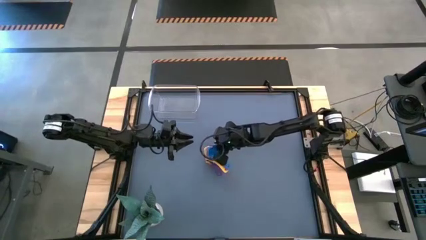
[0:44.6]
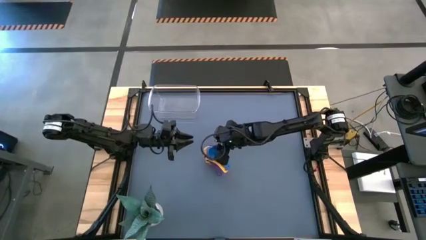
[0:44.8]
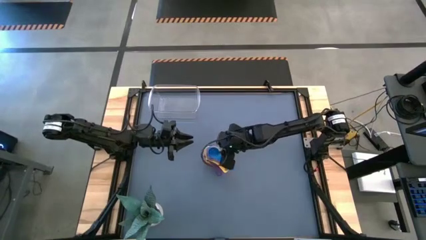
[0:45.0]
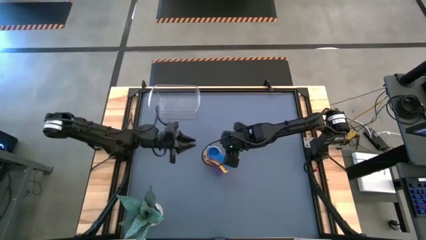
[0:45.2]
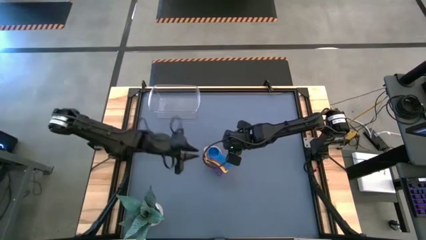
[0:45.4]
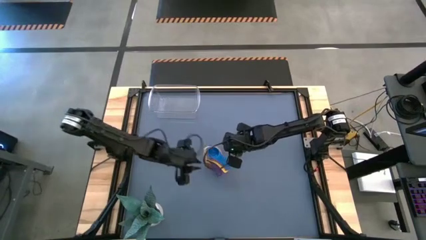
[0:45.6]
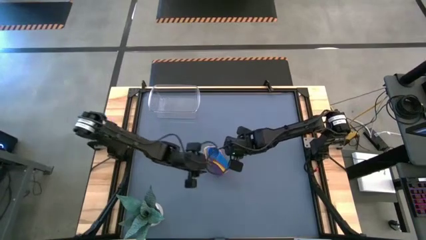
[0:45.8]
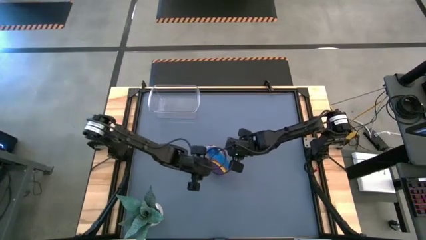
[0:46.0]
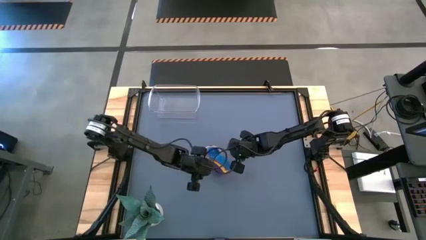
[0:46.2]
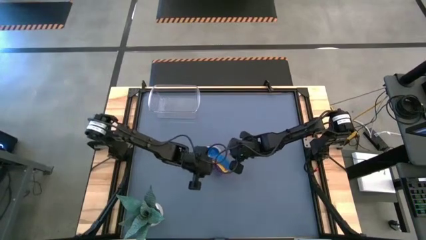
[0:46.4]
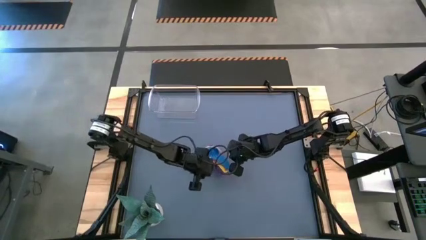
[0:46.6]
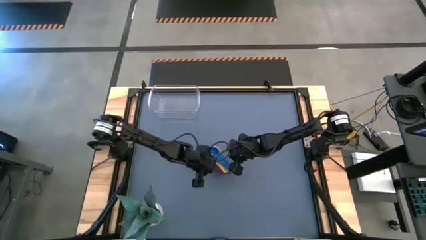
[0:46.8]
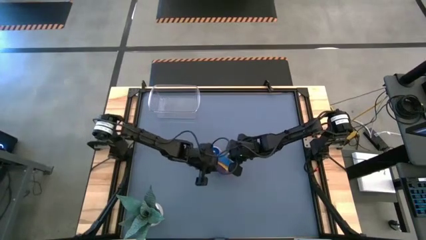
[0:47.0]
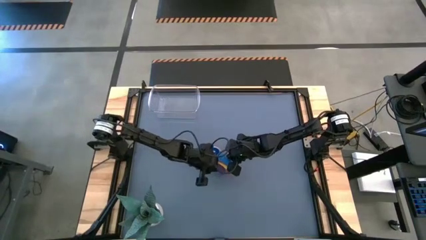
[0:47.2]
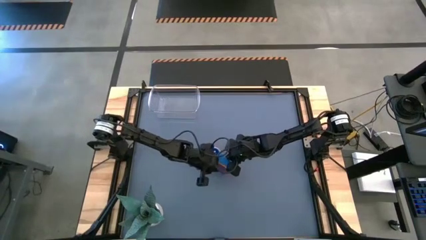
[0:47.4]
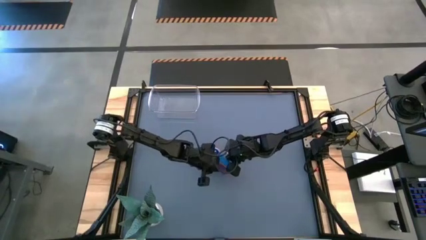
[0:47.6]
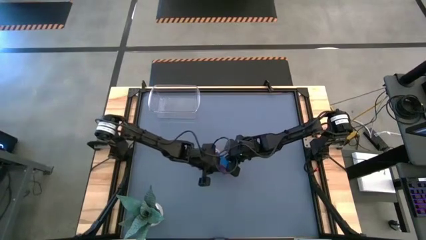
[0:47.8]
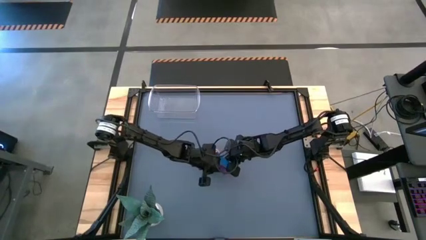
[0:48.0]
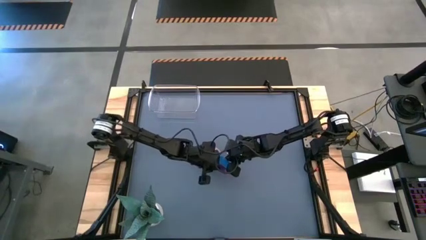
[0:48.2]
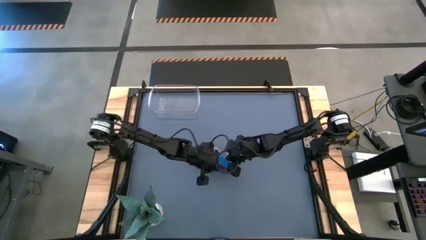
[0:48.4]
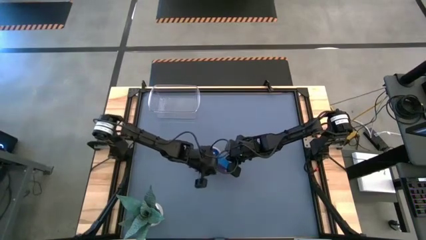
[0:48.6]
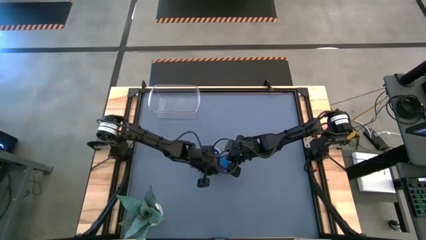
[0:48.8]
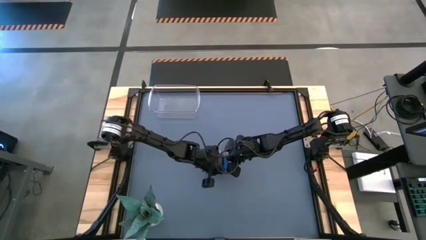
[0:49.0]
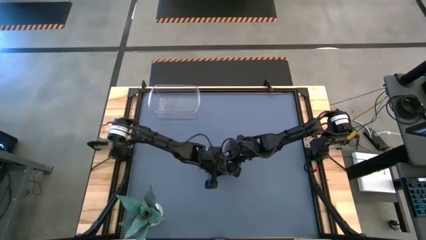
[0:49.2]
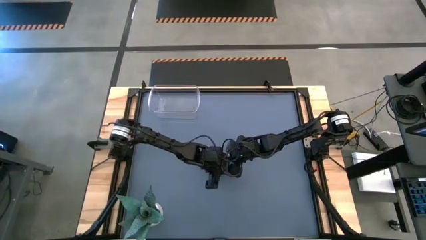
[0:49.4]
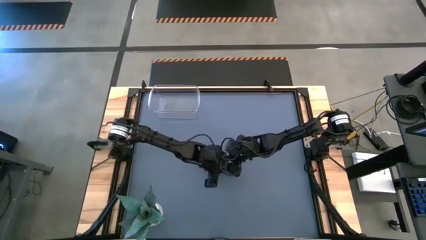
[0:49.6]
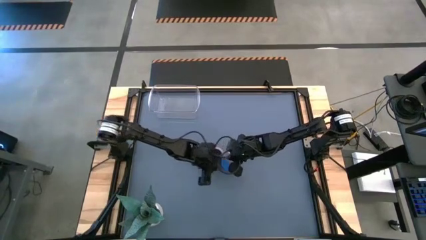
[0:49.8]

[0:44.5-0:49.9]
Task: Nest measuring cups in basket
Adjust the measuring cups

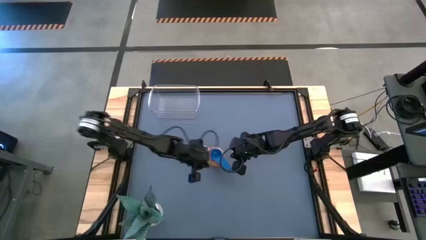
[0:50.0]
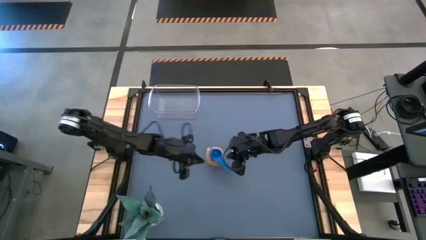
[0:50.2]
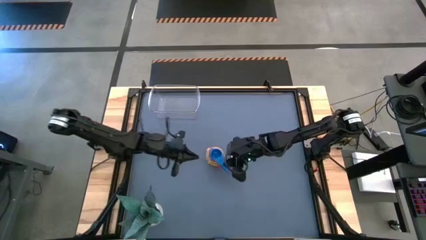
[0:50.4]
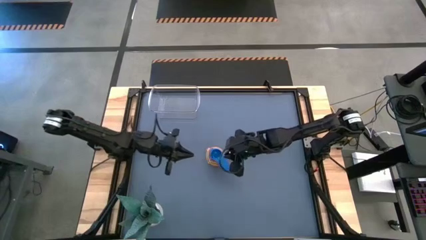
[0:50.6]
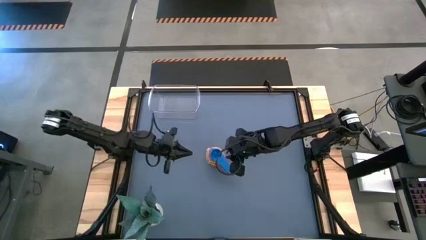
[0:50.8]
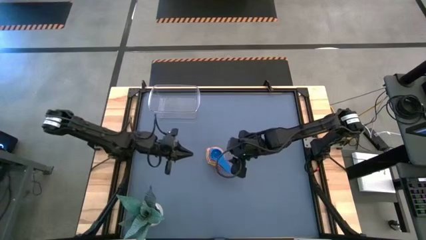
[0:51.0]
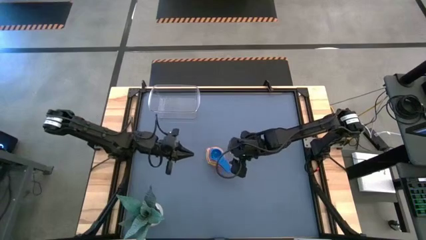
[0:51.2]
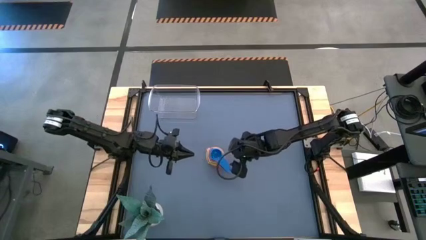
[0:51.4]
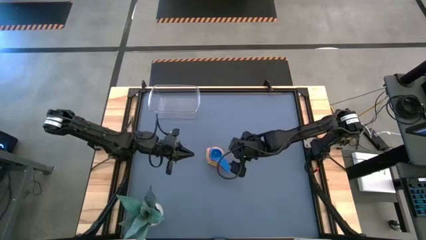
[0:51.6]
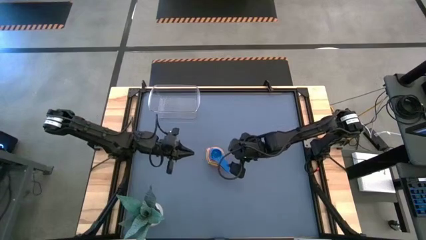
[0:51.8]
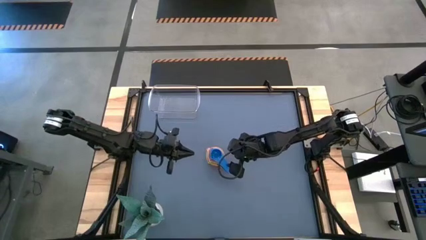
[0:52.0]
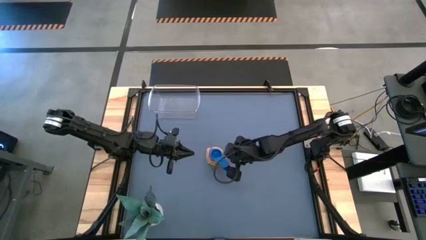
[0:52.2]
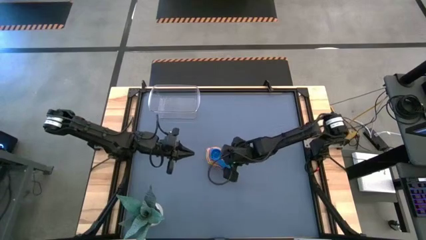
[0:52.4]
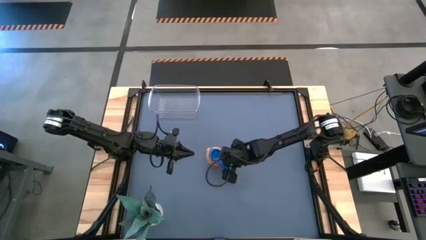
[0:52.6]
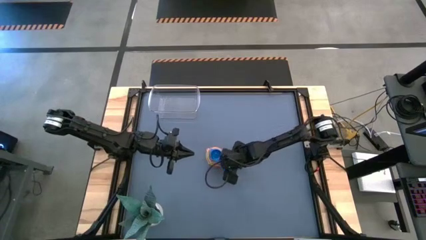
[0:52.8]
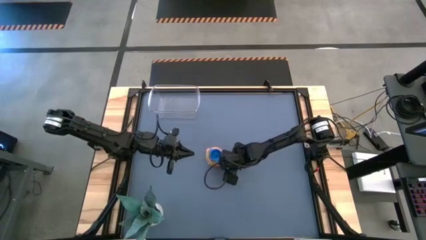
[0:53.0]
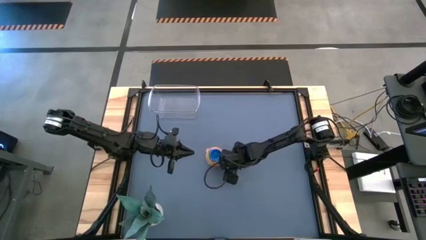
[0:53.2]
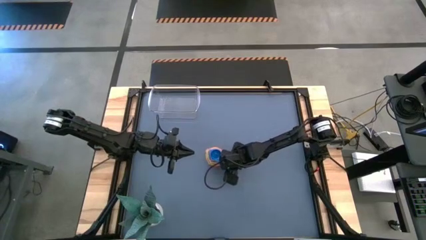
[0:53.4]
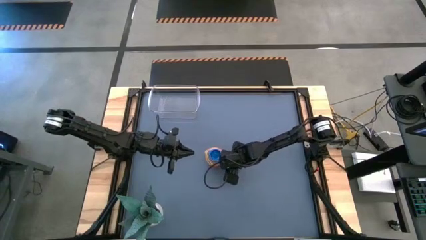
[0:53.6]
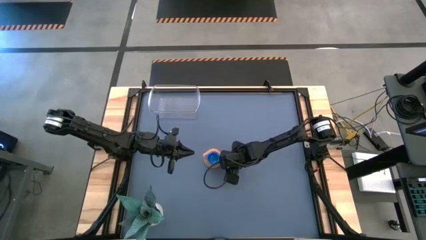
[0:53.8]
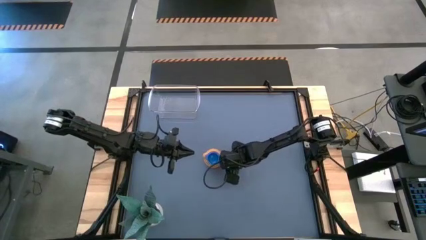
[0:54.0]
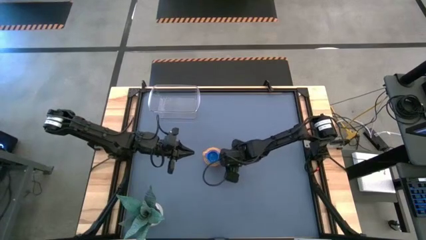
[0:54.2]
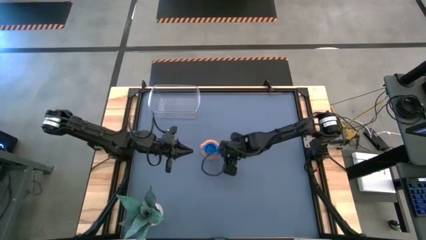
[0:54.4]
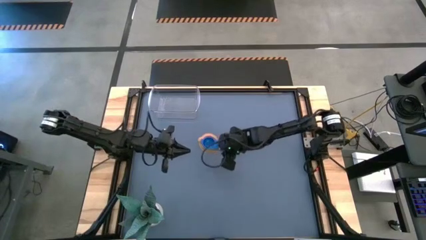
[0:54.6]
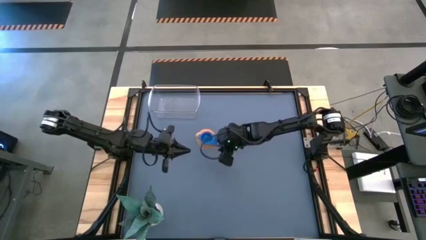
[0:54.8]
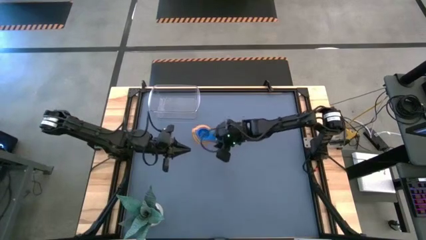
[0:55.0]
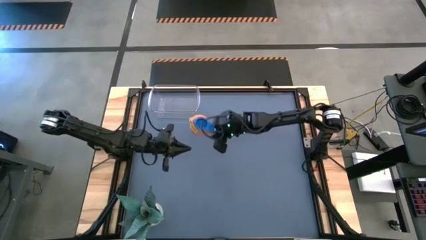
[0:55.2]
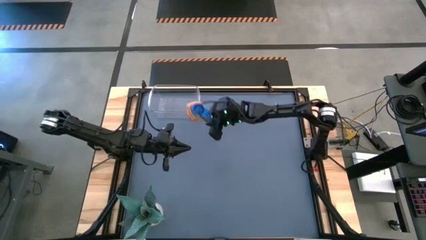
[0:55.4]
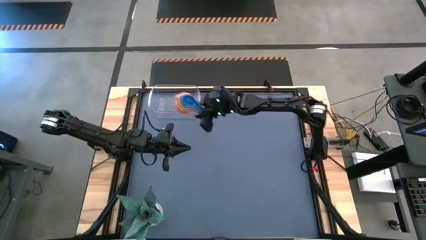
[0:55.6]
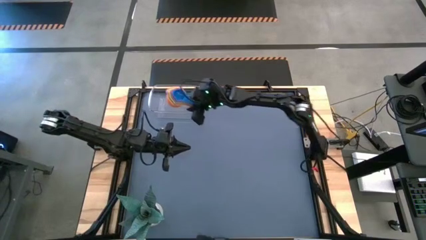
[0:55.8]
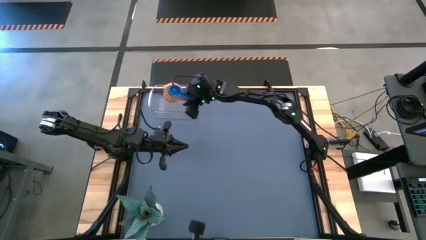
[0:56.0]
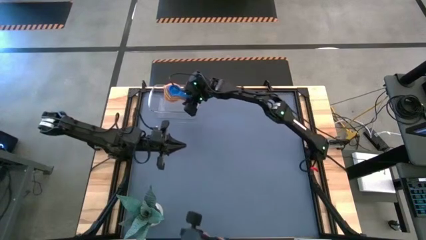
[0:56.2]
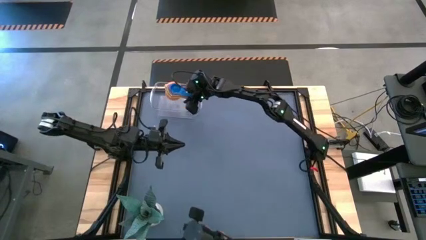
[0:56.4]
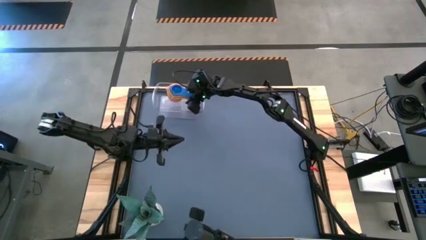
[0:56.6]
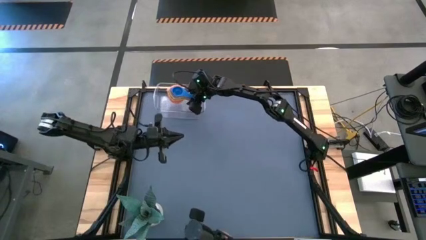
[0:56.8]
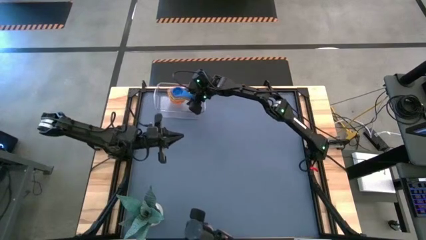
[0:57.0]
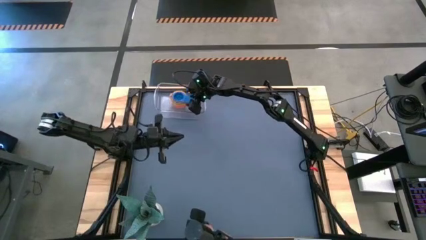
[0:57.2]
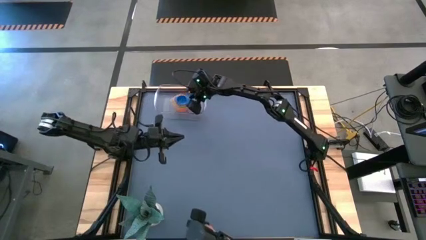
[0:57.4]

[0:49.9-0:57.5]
Put the nested measuring cups into the transparent bin

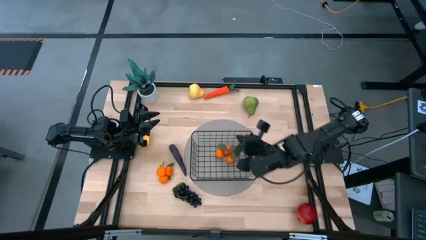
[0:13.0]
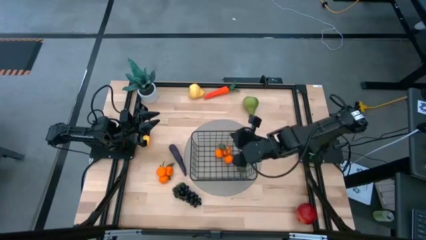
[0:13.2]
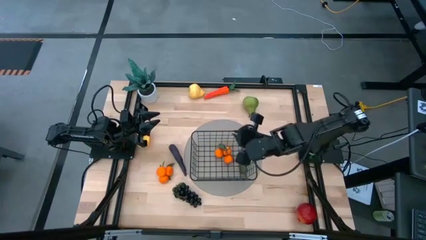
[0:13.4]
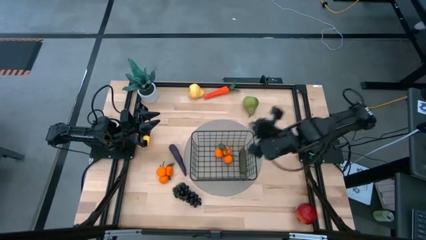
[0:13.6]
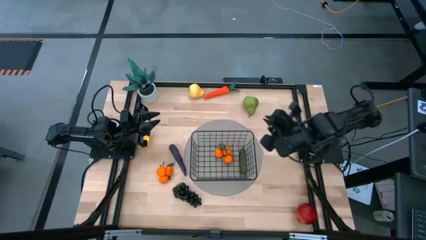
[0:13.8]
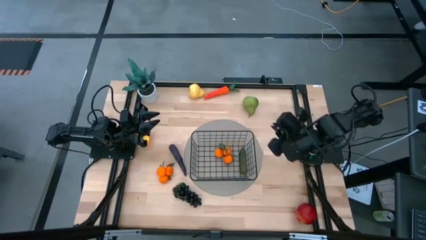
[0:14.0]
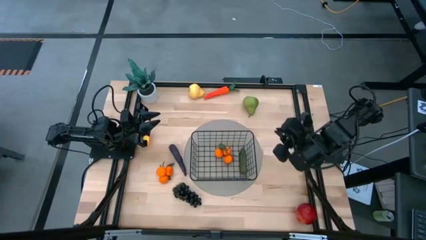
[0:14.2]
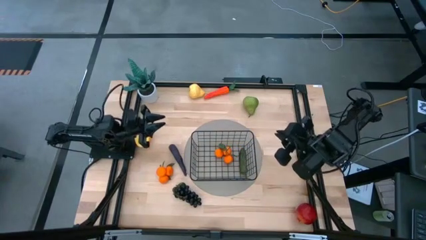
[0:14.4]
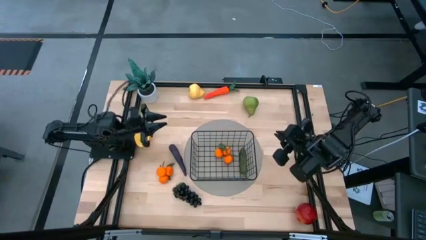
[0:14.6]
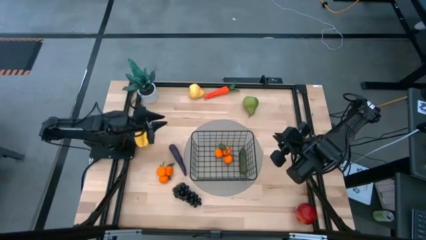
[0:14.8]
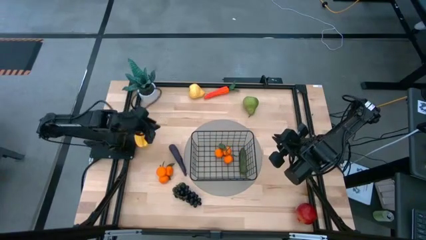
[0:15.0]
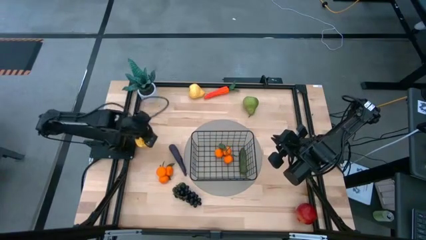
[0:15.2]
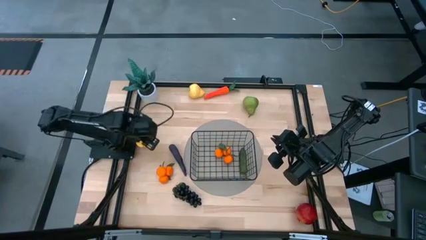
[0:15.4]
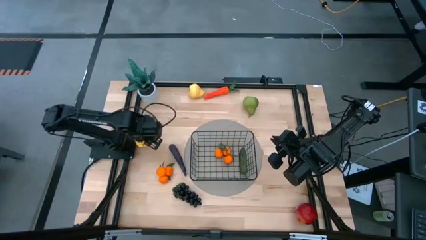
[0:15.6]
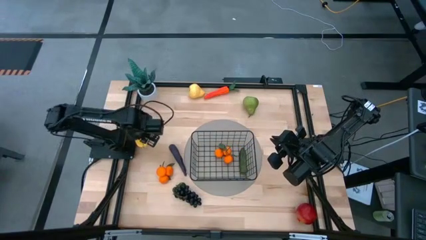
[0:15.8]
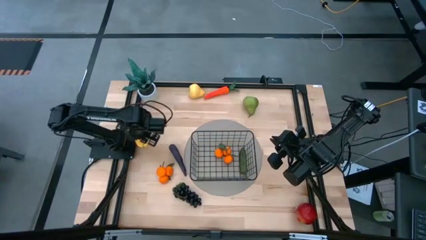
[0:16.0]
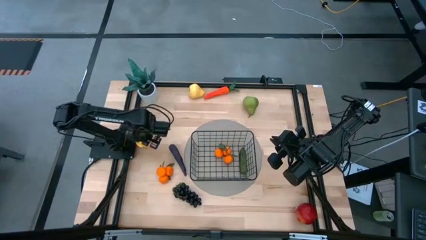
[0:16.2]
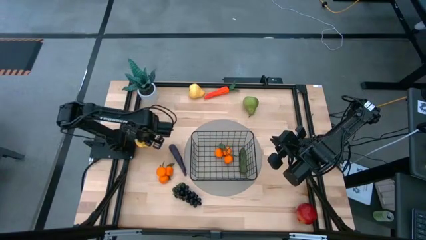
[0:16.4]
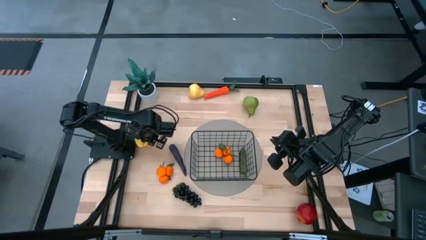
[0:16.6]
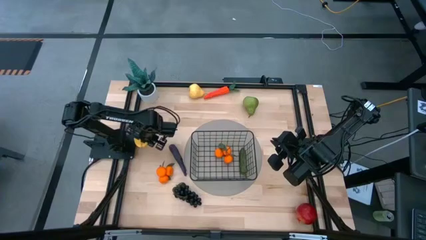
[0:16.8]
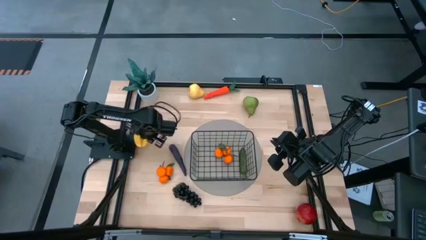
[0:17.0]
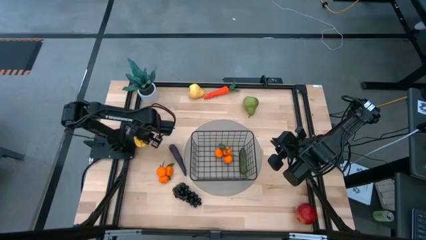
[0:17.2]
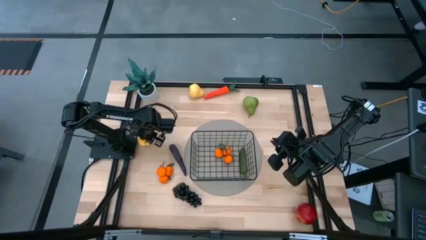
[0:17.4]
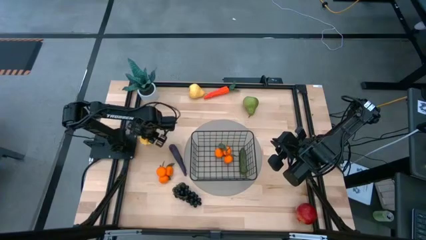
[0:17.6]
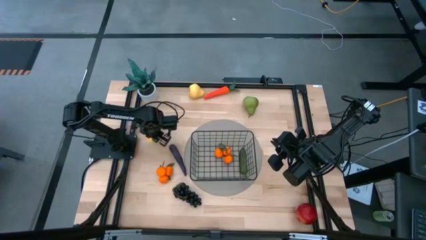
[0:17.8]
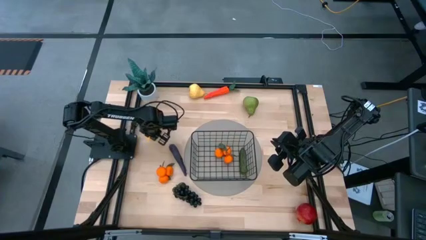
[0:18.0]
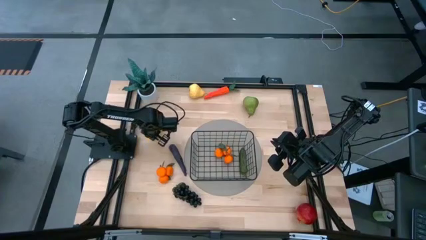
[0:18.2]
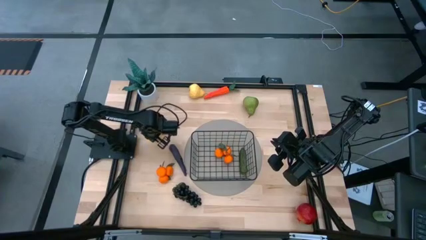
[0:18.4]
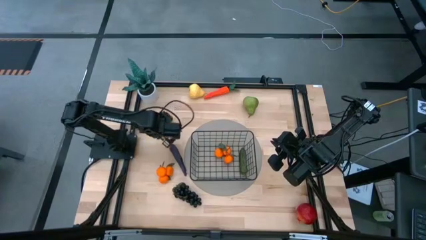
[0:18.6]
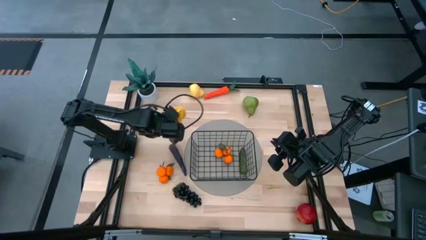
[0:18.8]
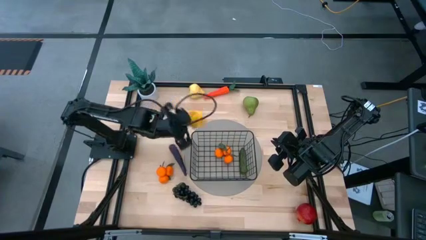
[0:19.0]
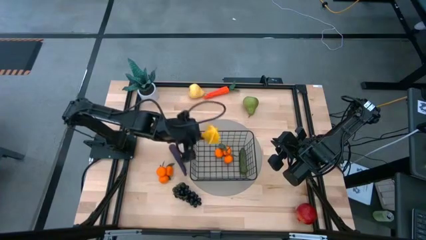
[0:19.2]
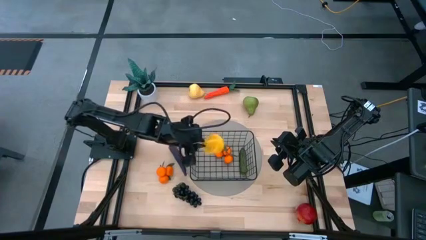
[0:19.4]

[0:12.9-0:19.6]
Task: Build produce basket
Put the yellow starfruit into the black wire basket
